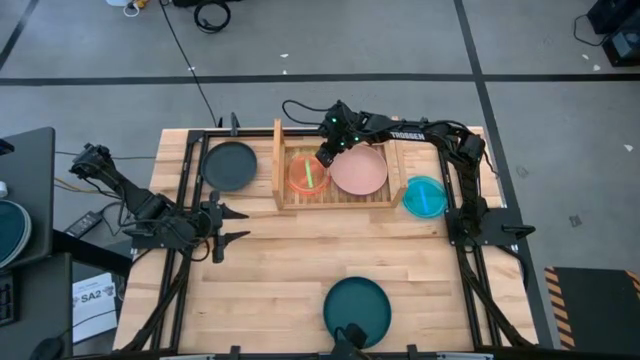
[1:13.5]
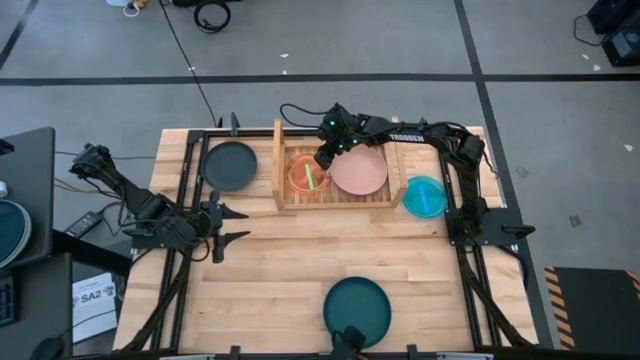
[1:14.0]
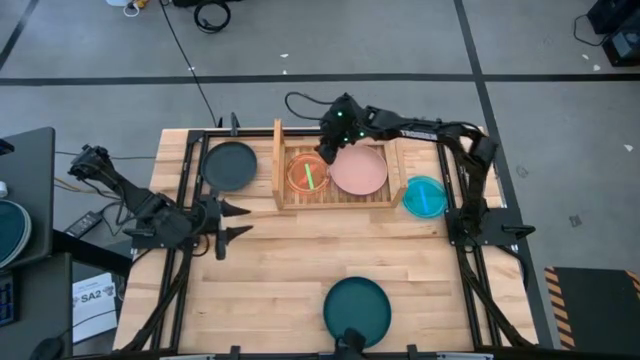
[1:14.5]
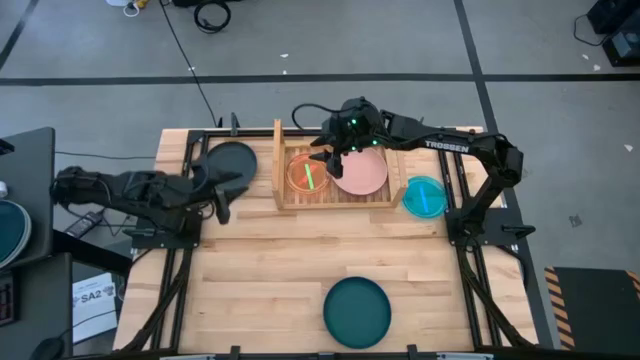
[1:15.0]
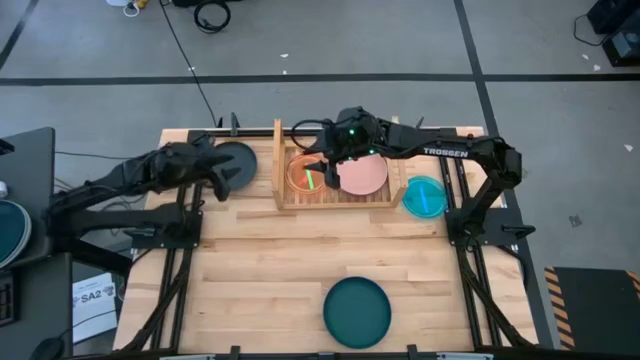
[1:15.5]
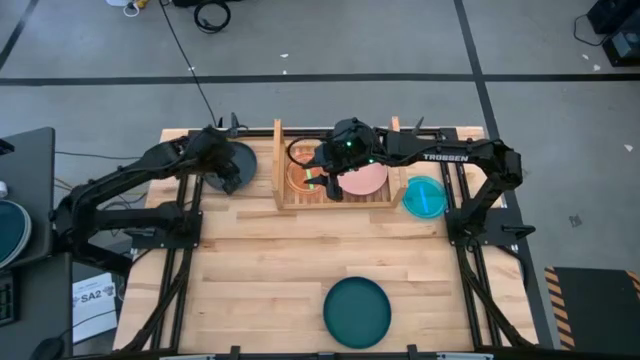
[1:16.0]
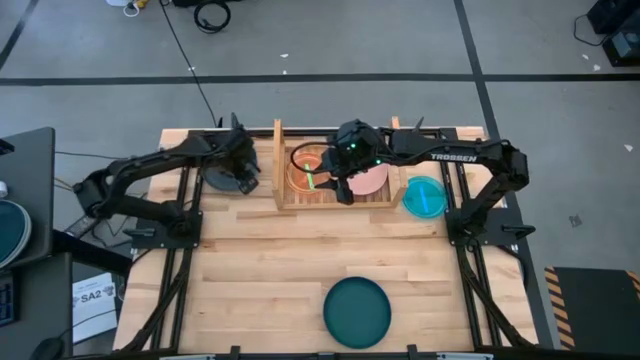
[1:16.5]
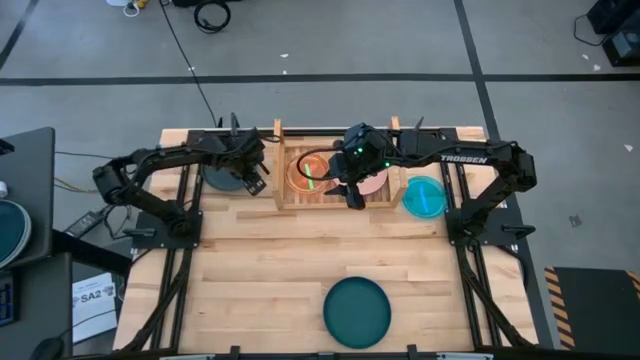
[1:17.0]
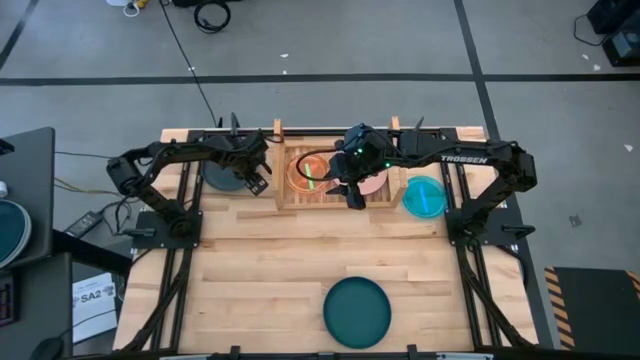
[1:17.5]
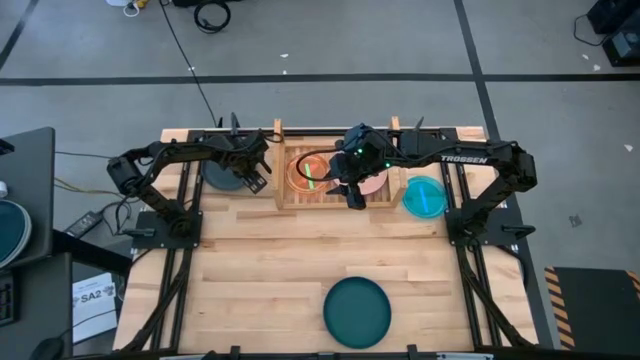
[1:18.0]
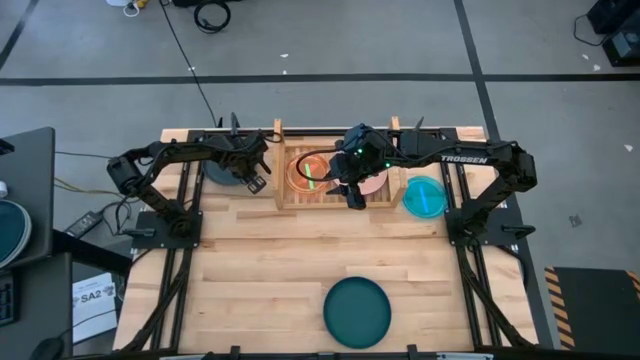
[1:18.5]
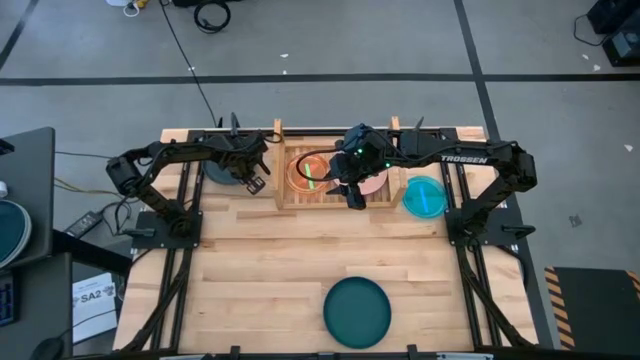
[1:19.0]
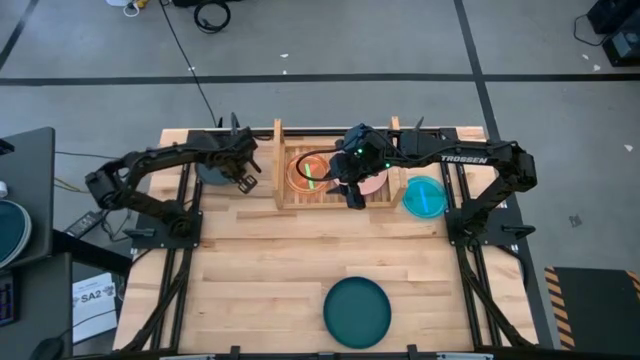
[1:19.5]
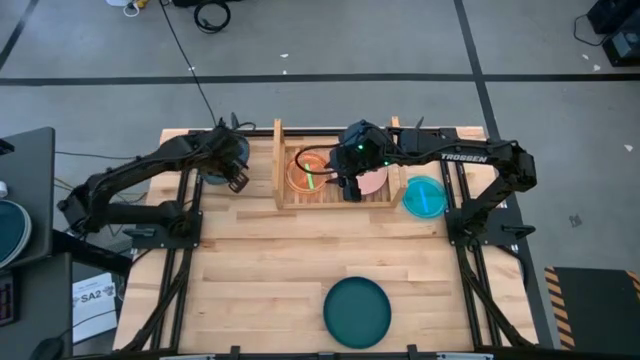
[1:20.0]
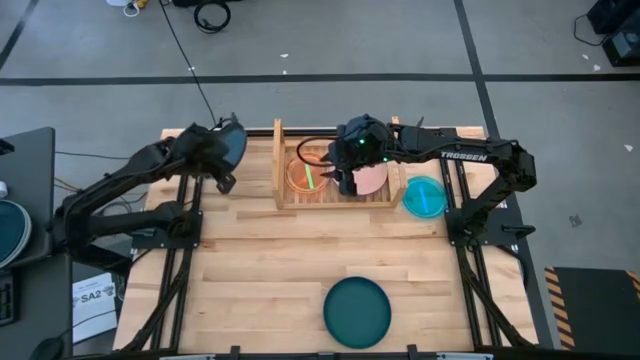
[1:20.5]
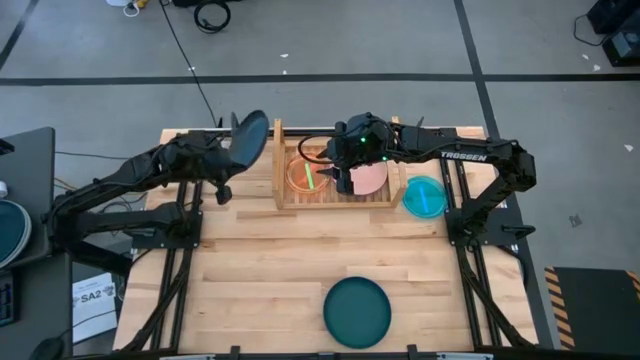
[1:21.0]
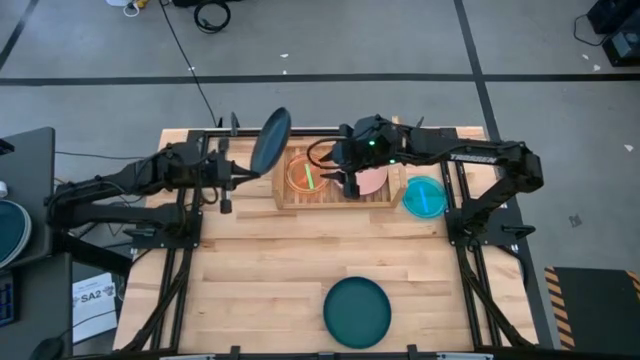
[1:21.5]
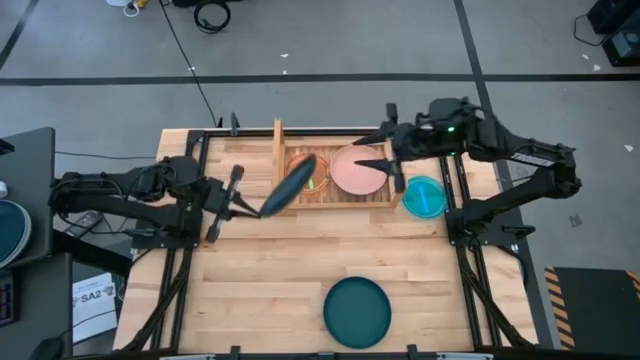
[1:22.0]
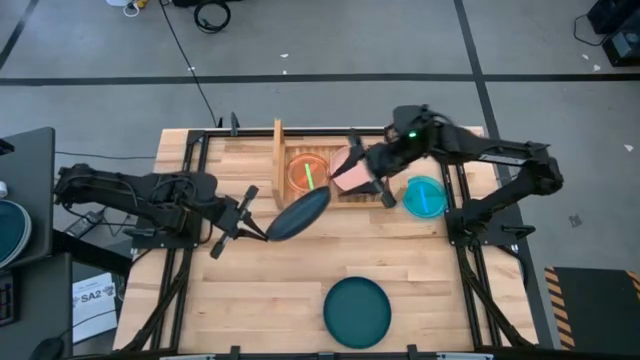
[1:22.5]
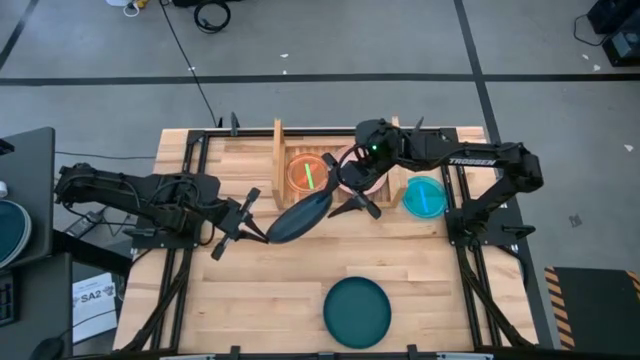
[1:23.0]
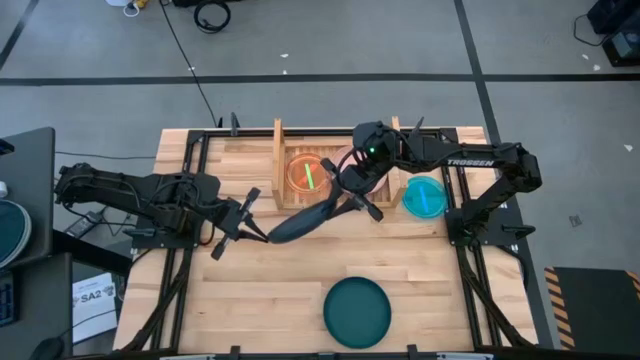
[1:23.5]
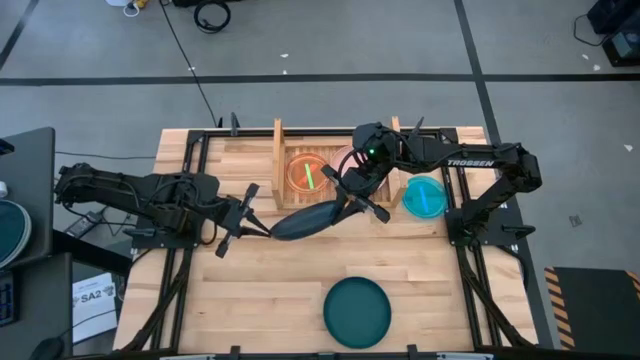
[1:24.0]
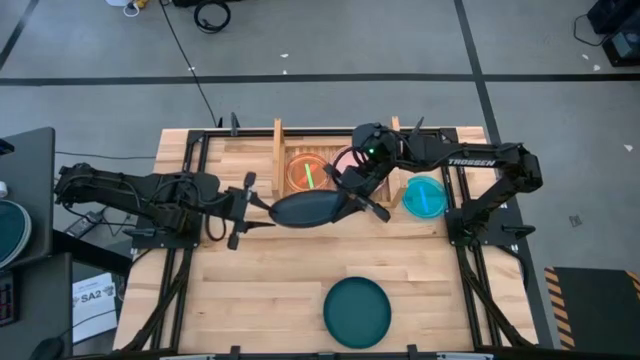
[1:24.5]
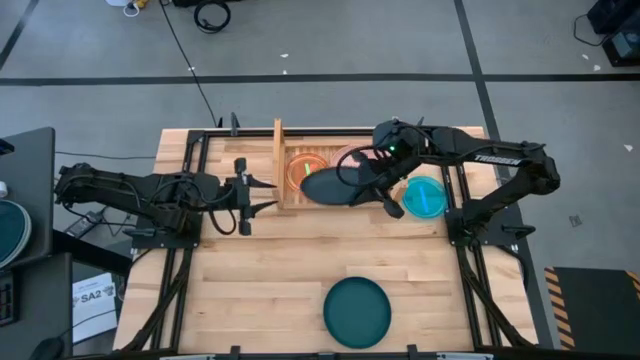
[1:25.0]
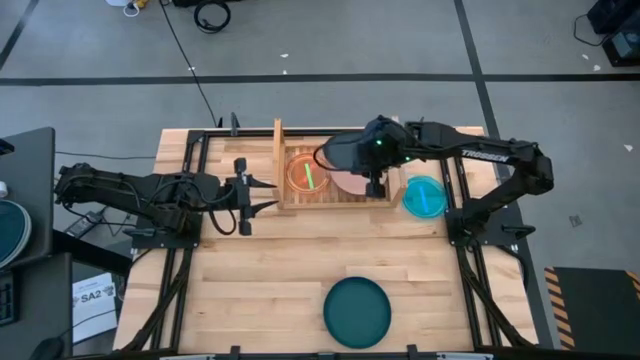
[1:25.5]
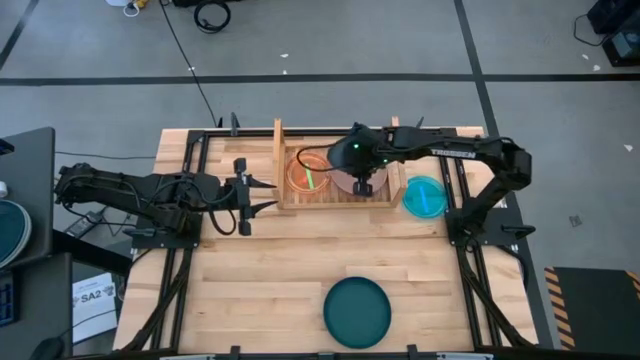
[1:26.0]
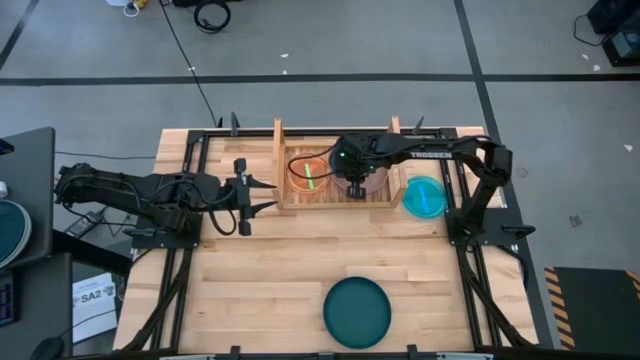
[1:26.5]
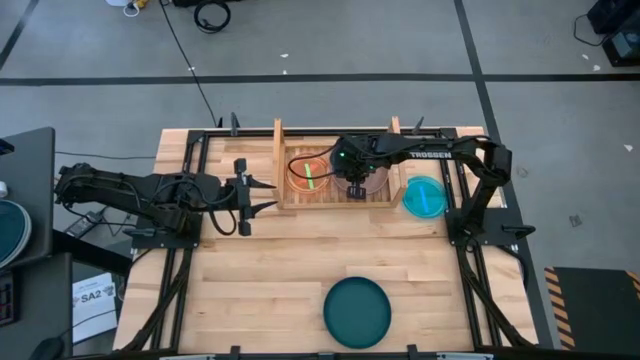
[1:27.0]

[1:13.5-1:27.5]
Task: Place and stack plates onto a shelf
Stack the top large black plate on top of the large pink plate on the shelf

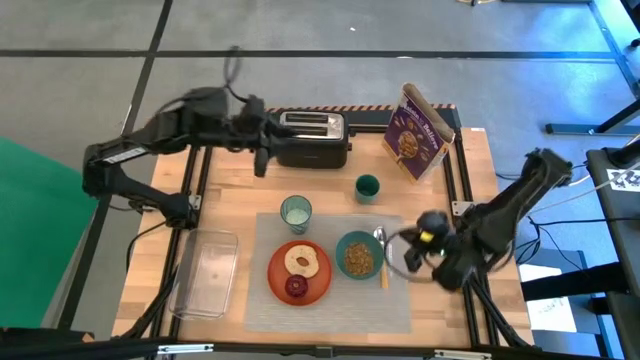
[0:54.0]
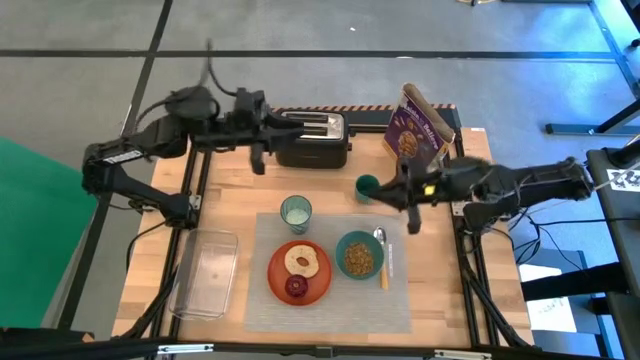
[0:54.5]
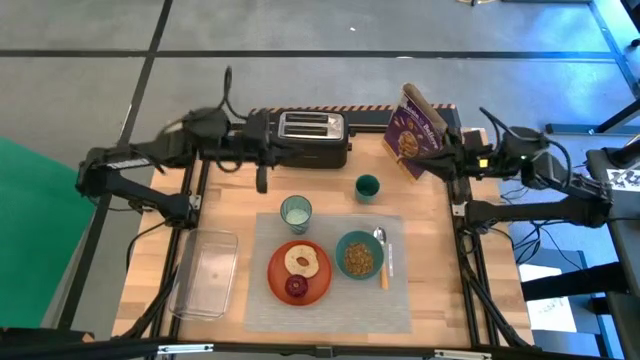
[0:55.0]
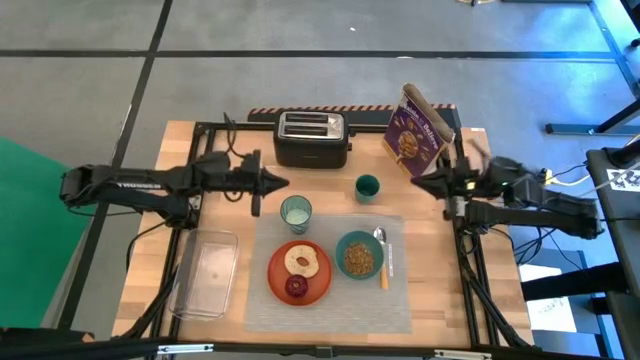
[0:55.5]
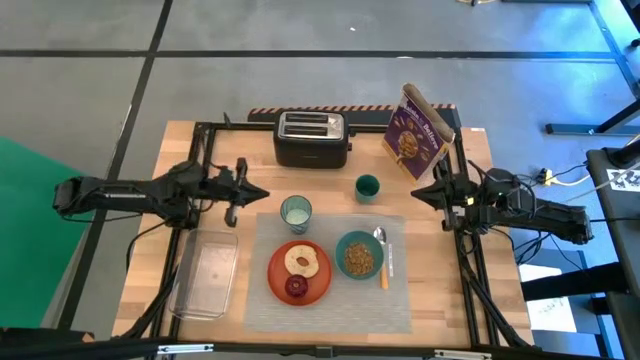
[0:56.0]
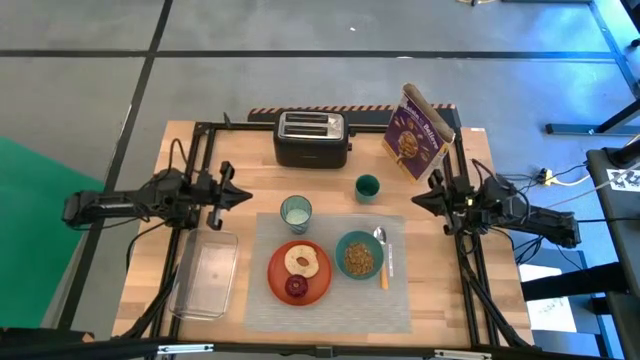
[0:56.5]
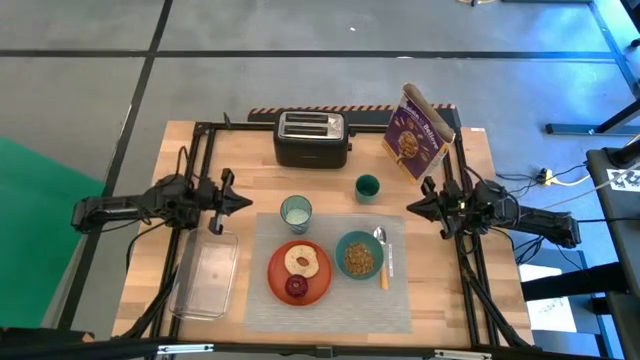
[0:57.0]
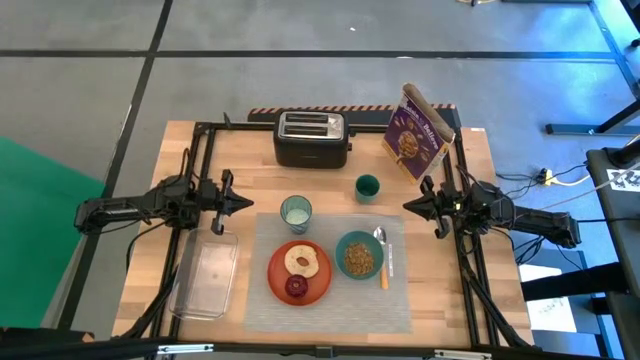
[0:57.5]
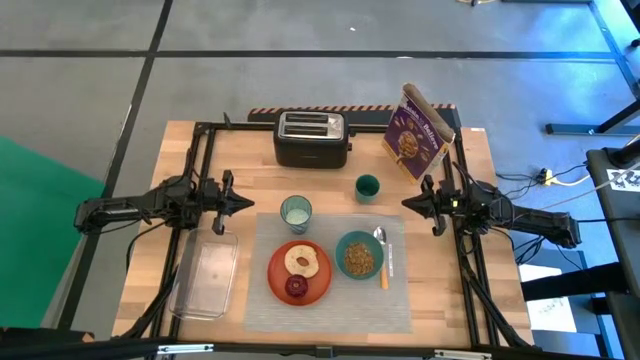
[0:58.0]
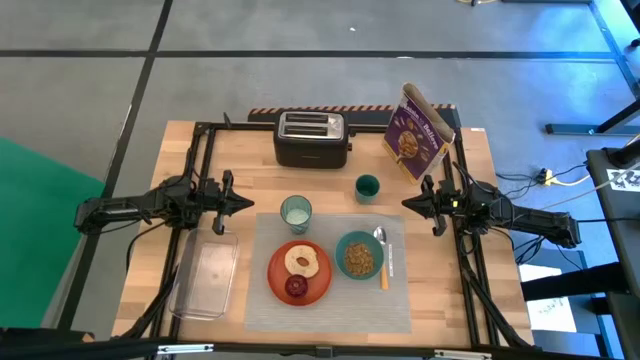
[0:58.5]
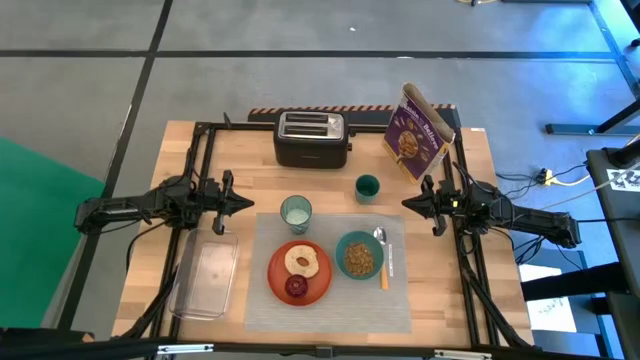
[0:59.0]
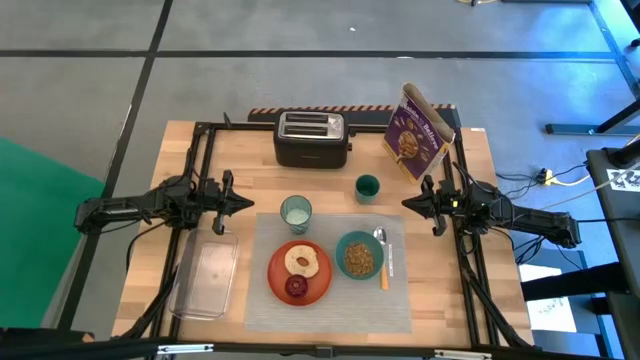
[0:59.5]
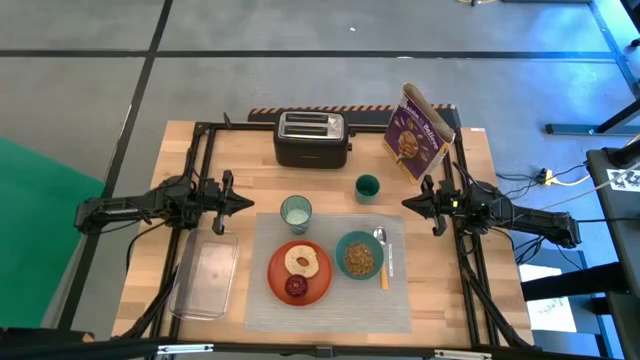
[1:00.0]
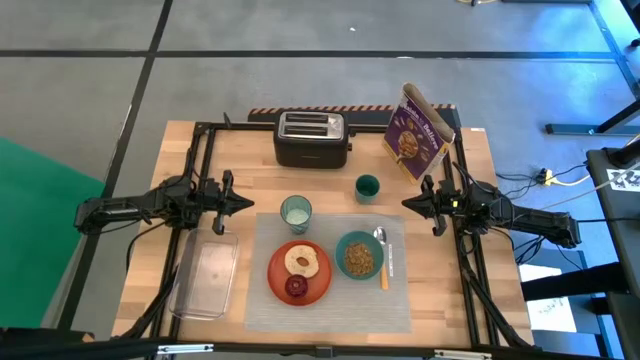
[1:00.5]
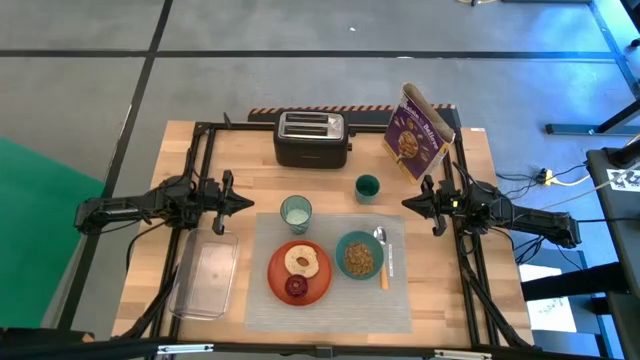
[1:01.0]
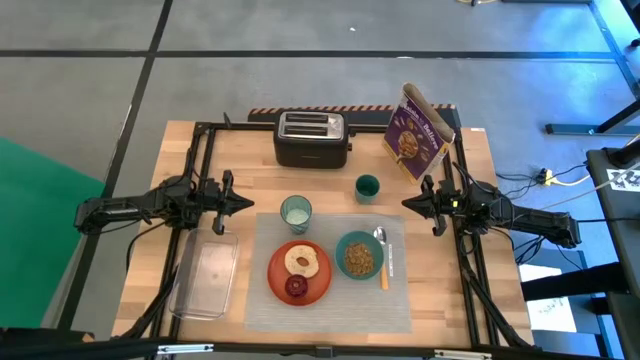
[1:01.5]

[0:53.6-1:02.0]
Task: Arrange a breakfast setting
Return to Home Position
